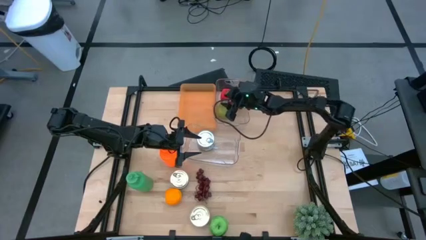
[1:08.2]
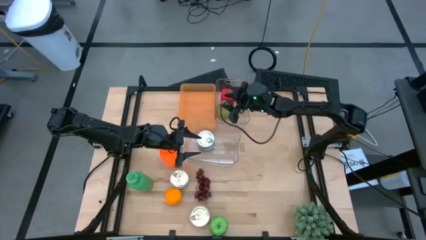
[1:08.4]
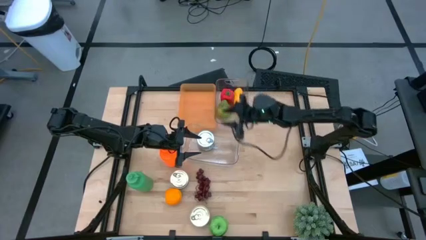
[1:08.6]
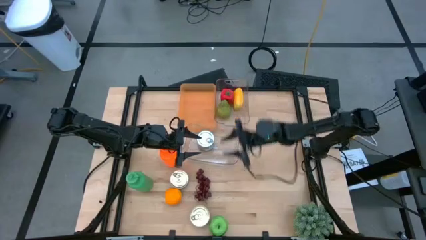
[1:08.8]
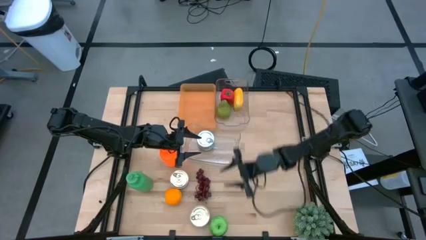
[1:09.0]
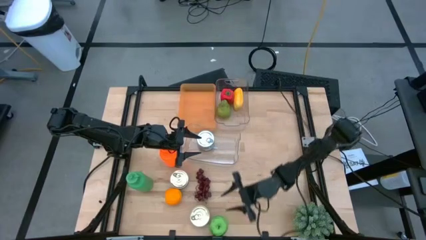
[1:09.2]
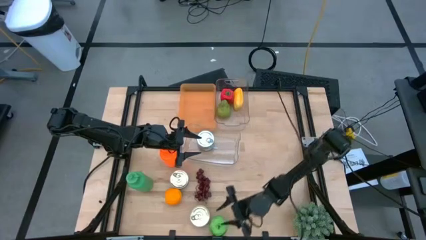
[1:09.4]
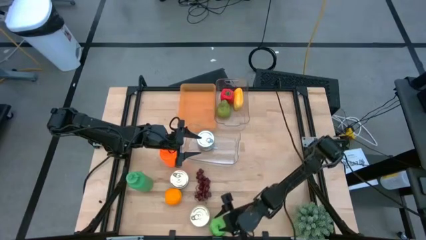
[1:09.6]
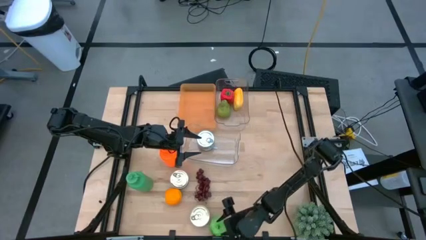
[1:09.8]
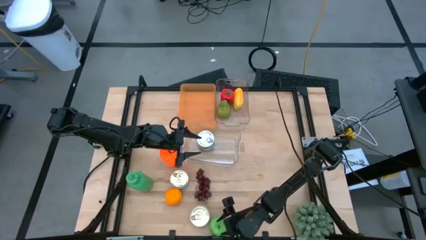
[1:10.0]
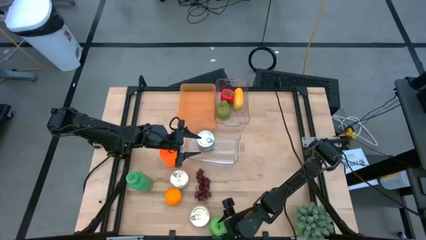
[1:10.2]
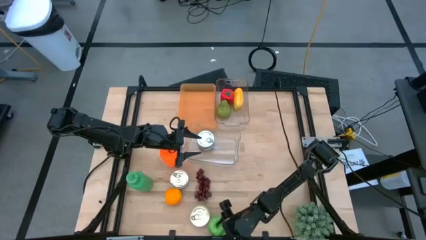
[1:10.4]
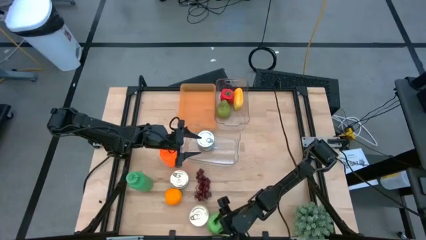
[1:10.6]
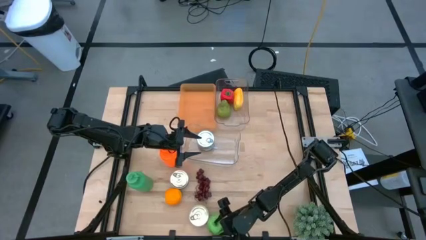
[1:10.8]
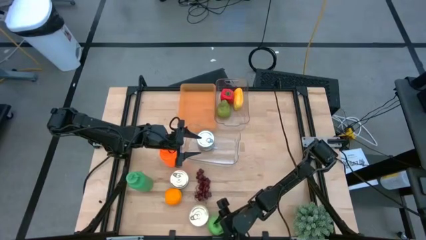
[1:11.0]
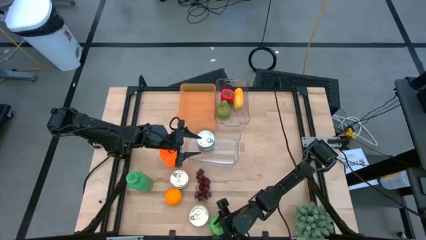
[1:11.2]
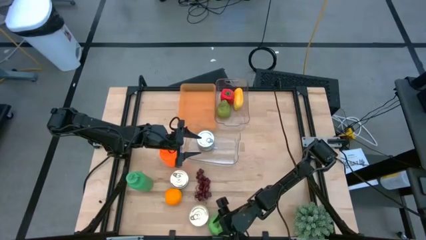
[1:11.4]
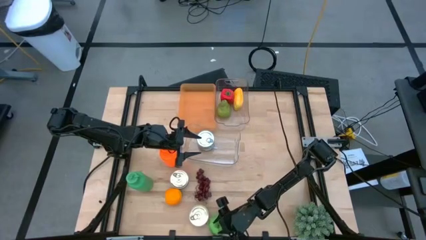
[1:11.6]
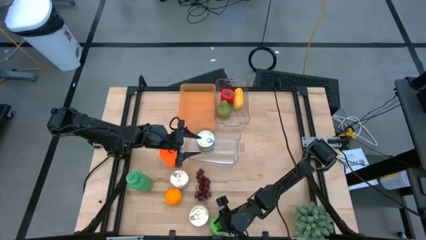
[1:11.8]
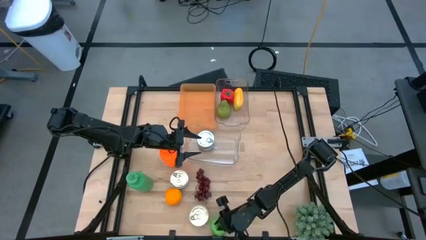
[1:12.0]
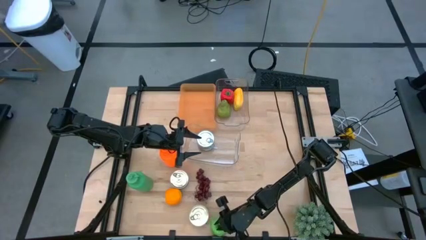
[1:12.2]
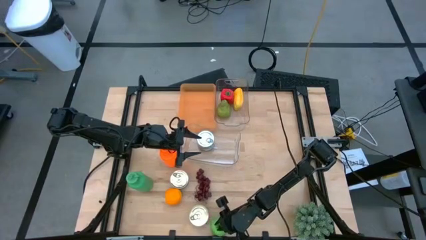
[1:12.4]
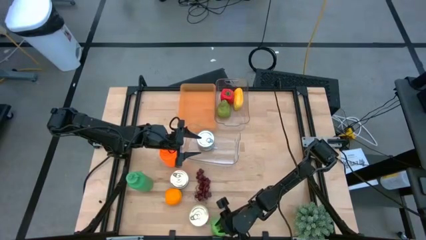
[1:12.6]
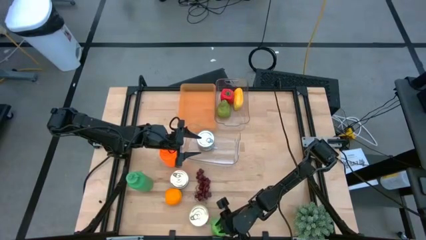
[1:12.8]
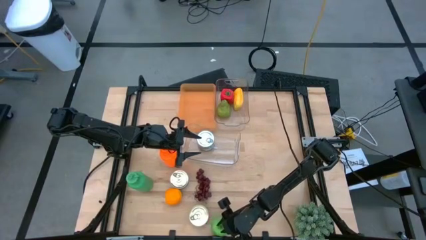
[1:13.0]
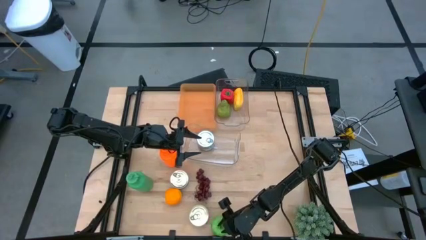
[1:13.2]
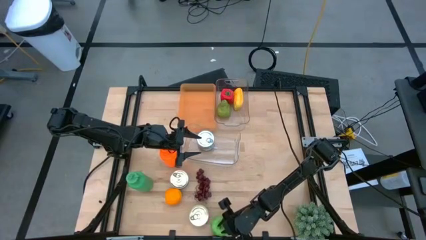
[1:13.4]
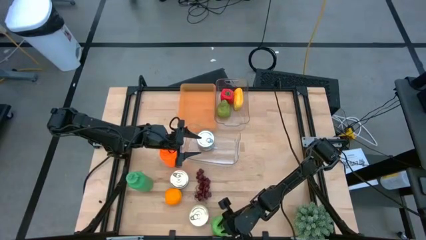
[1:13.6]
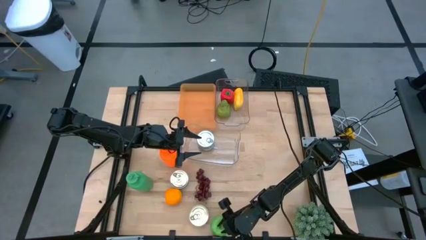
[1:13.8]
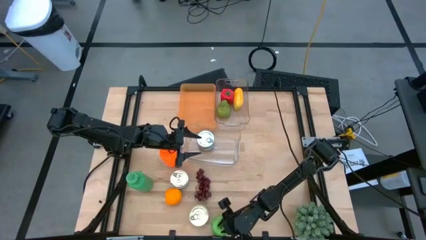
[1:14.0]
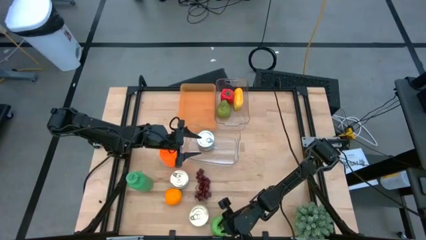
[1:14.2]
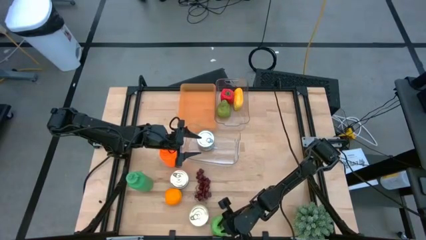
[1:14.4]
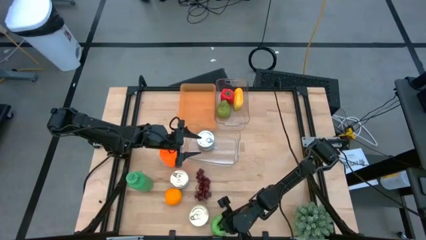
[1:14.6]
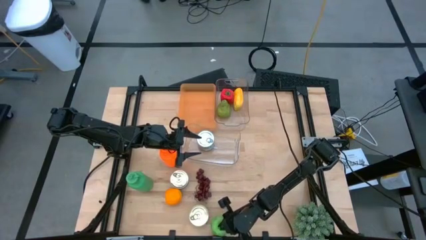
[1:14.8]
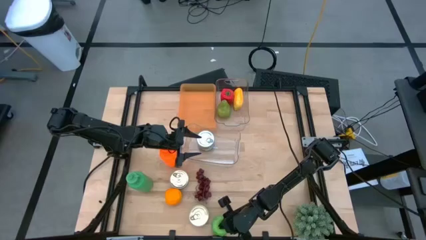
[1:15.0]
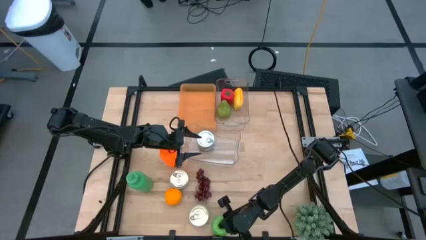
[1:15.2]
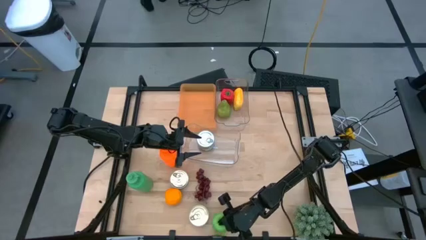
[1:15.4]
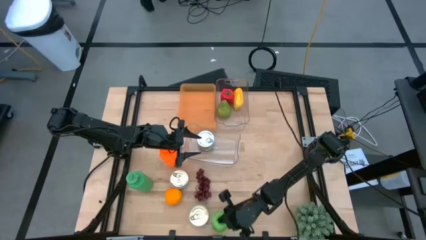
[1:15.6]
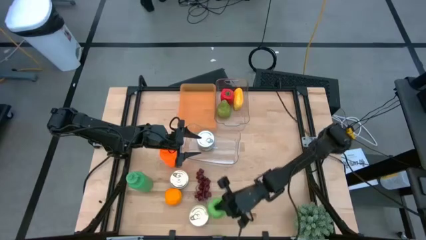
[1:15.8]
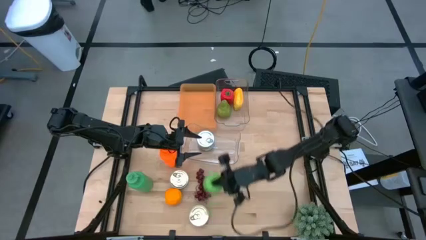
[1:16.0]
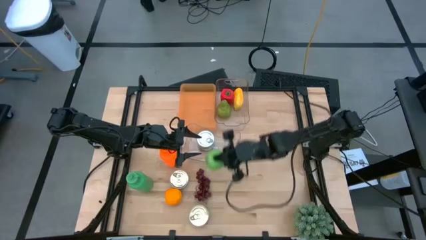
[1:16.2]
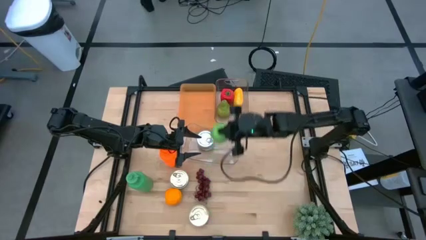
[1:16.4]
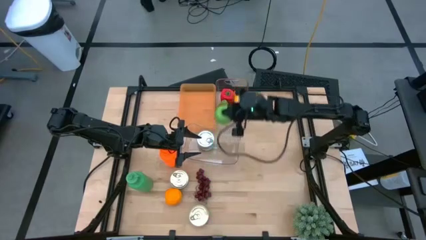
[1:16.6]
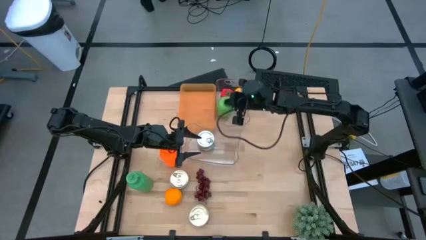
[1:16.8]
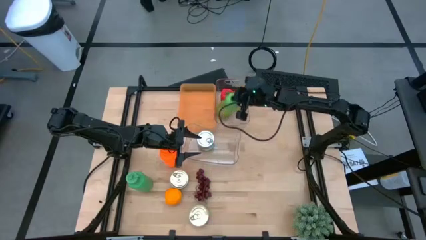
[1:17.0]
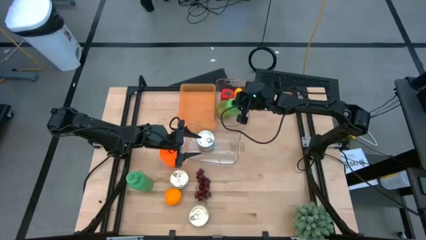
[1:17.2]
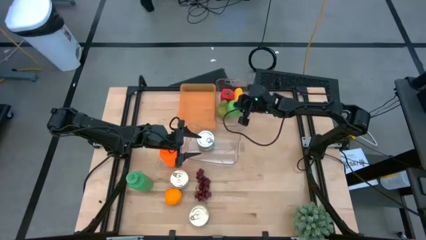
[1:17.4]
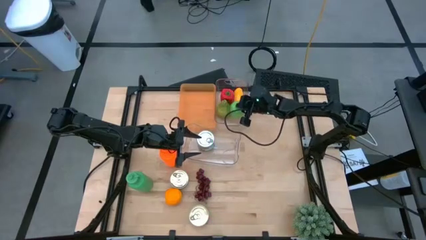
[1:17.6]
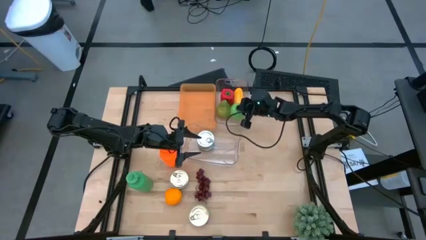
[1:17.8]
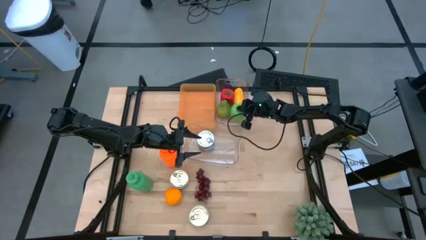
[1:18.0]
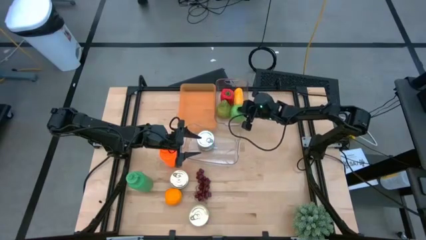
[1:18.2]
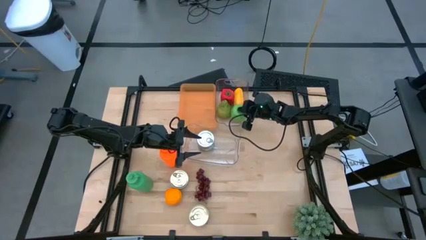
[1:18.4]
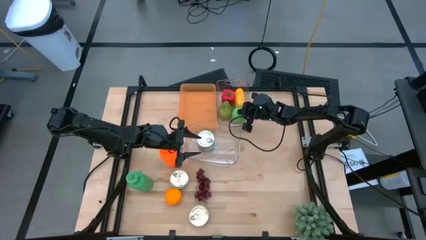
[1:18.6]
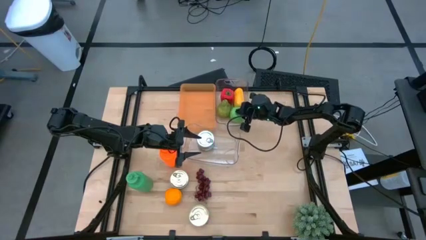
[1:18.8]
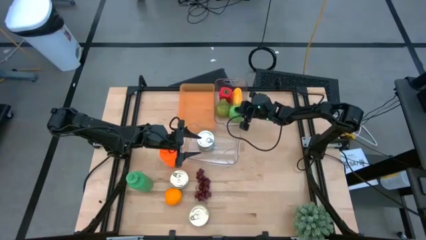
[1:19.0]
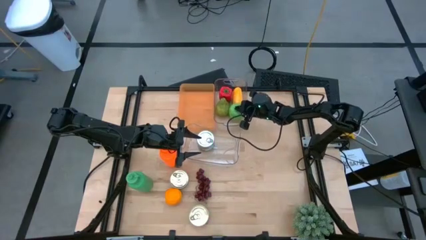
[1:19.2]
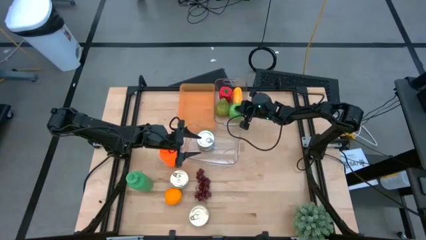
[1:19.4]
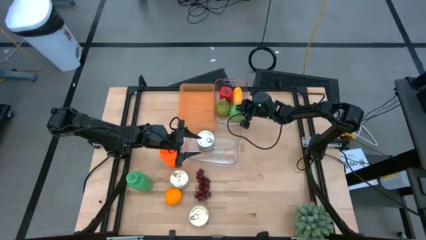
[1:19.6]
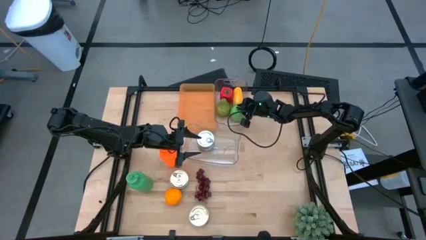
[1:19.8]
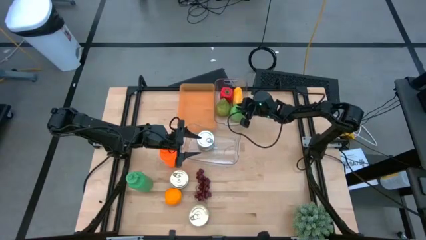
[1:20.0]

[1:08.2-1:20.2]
Task: Pick & Place Food Item
Put the apple into the top transparent bin

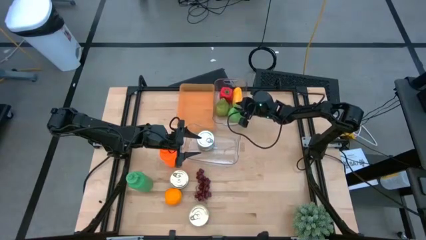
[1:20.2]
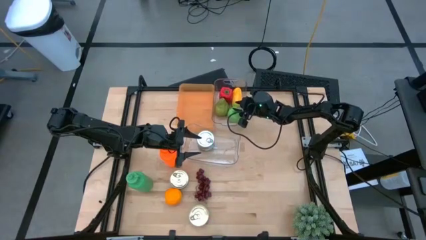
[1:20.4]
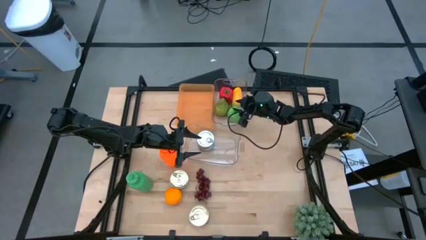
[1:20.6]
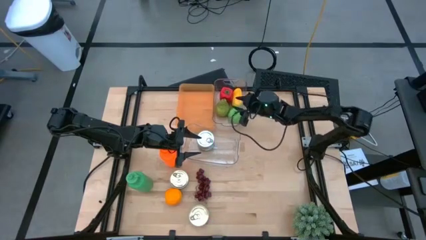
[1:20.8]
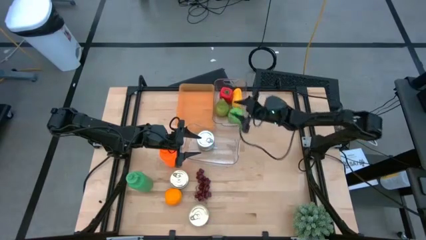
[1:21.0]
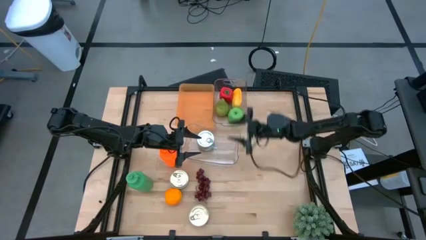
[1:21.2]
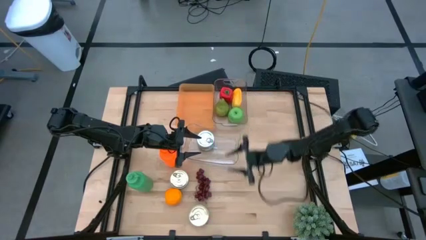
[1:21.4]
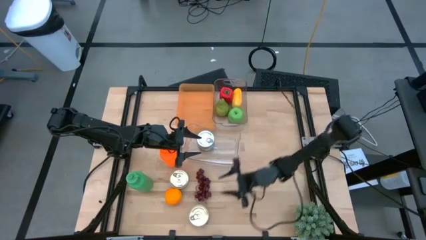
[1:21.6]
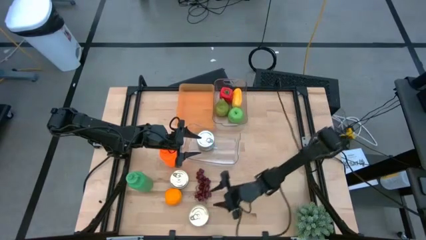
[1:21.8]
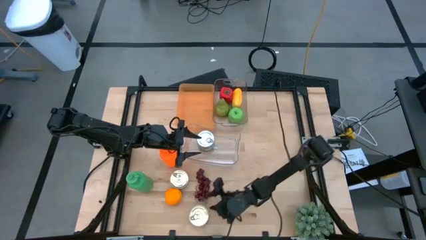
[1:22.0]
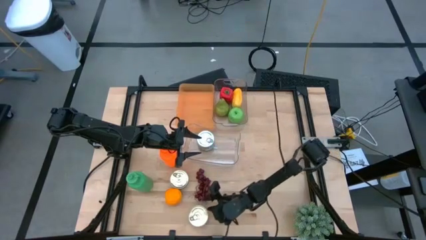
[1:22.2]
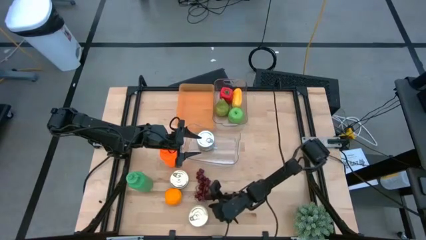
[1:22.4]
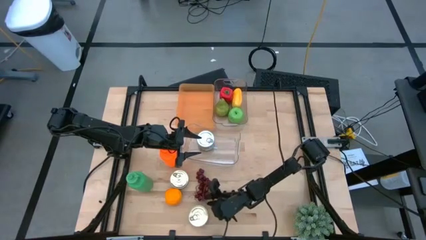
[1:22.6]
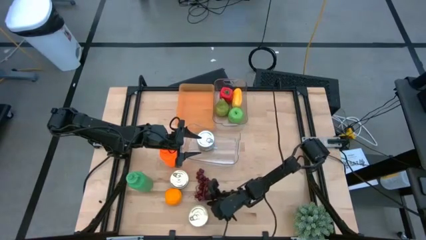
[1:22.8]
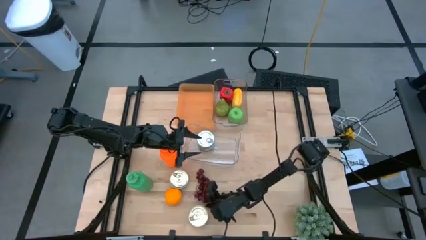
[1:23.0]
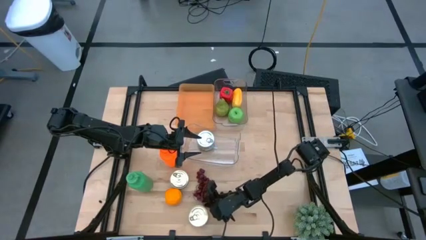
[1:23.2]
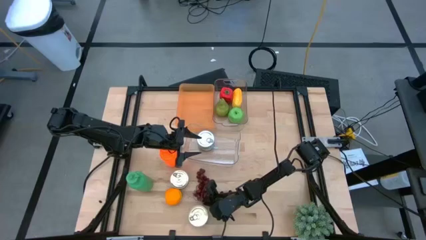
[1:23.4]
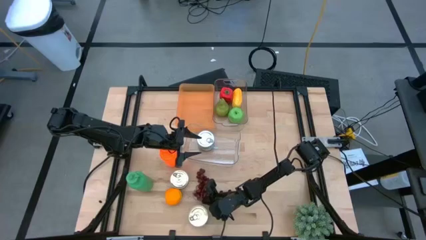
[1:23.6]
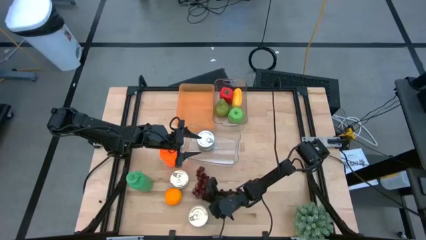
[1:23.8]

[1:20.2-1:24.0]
Put the grapes into the top transparent bin
